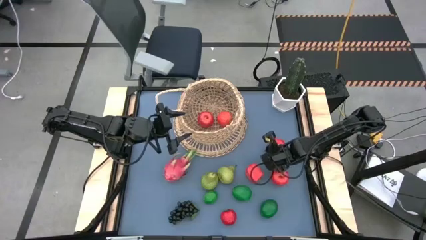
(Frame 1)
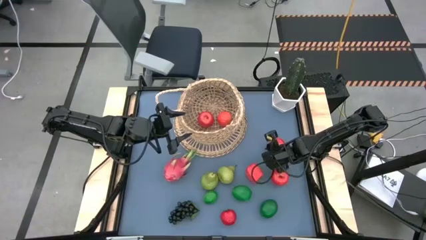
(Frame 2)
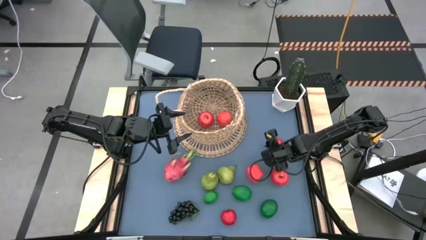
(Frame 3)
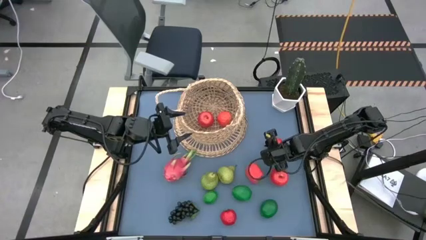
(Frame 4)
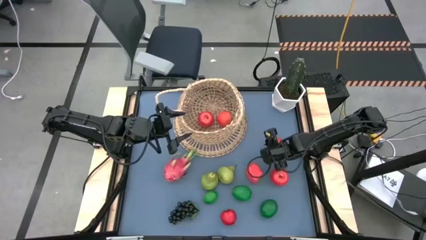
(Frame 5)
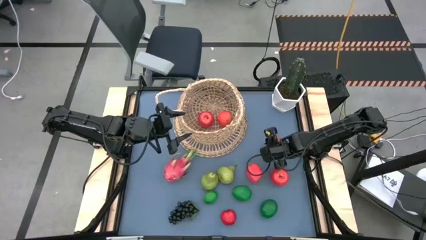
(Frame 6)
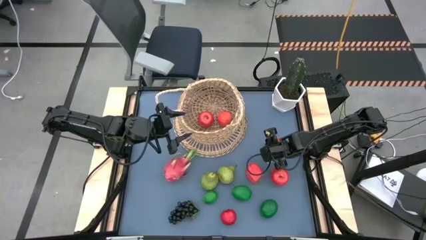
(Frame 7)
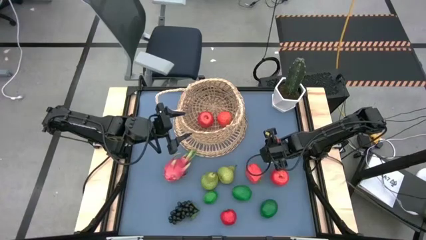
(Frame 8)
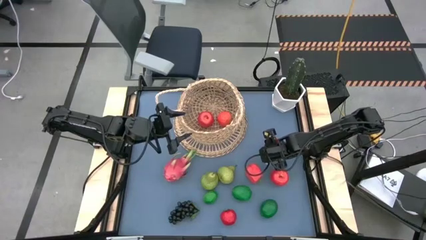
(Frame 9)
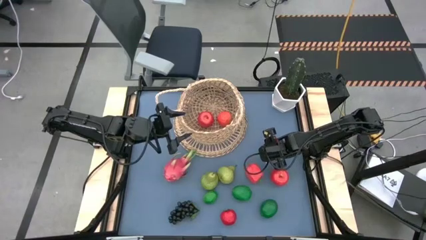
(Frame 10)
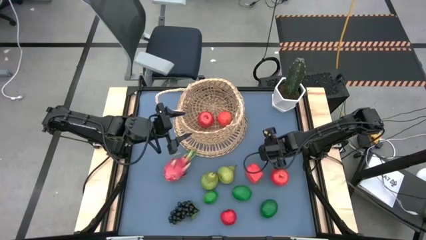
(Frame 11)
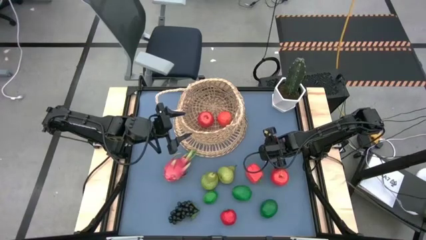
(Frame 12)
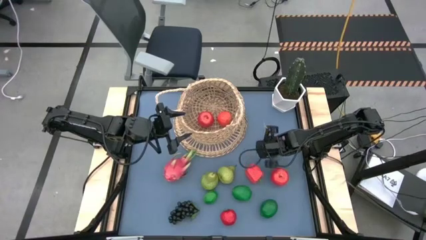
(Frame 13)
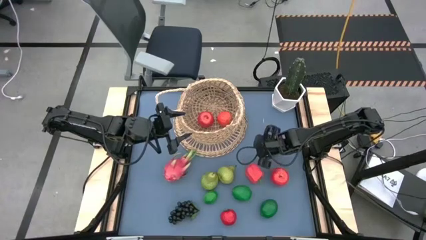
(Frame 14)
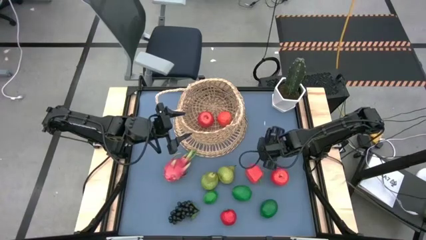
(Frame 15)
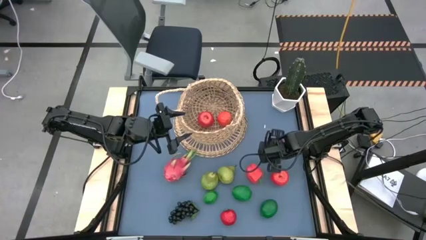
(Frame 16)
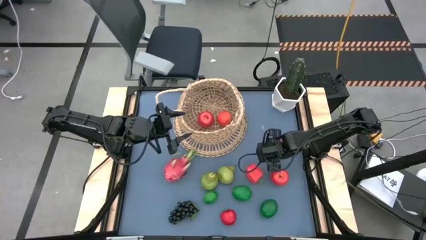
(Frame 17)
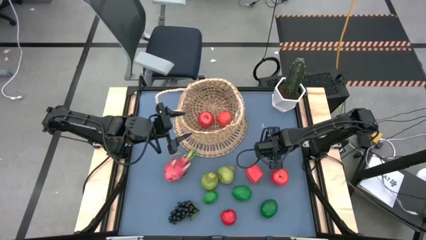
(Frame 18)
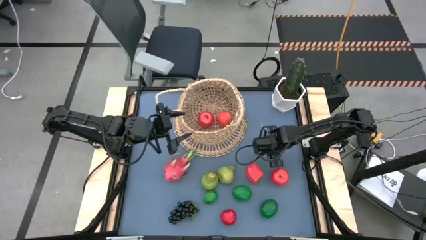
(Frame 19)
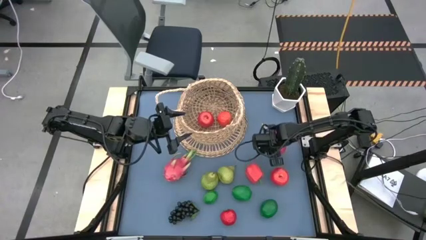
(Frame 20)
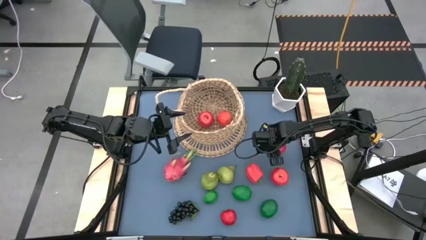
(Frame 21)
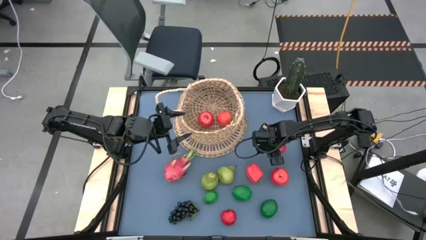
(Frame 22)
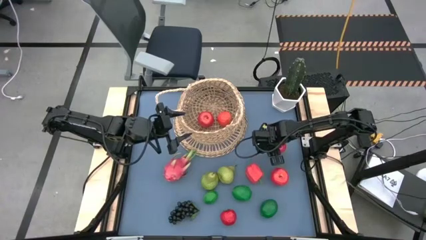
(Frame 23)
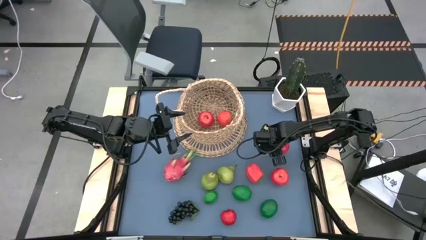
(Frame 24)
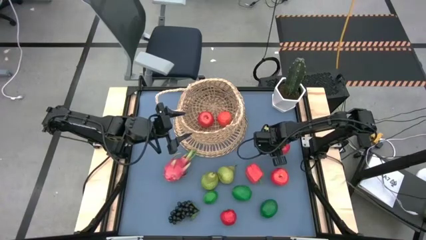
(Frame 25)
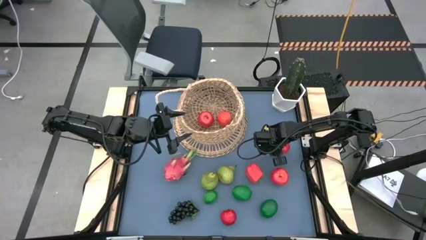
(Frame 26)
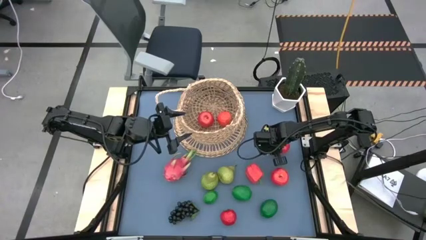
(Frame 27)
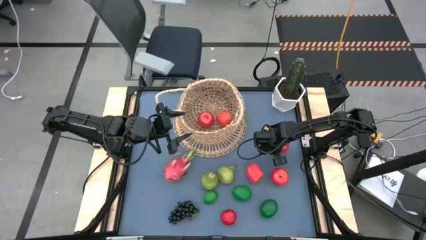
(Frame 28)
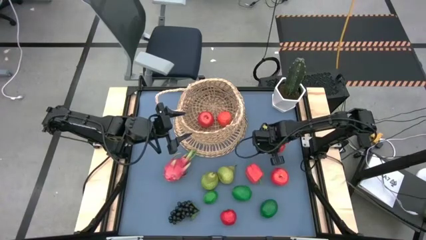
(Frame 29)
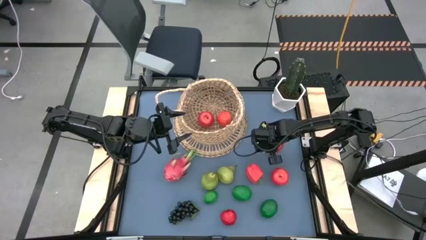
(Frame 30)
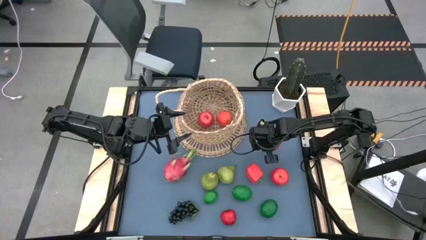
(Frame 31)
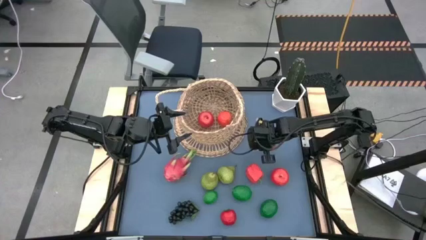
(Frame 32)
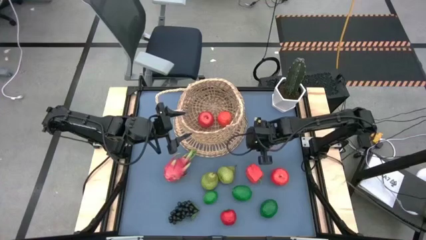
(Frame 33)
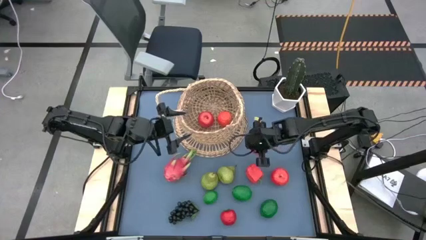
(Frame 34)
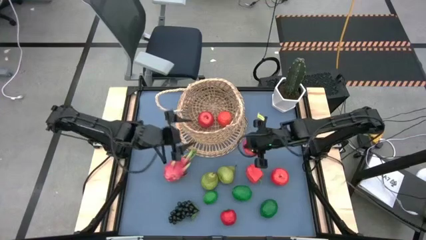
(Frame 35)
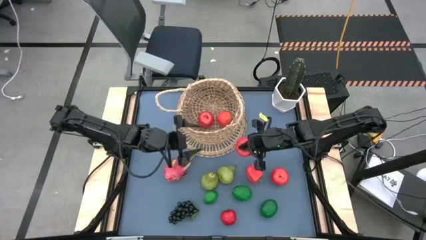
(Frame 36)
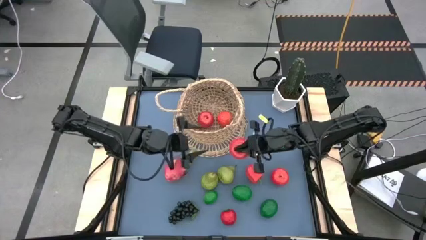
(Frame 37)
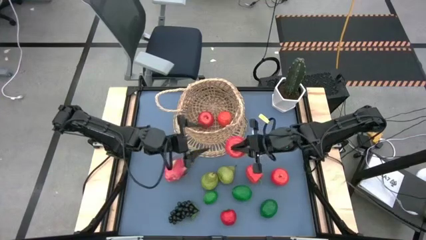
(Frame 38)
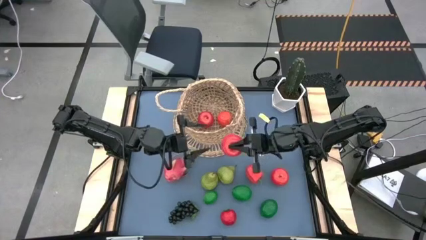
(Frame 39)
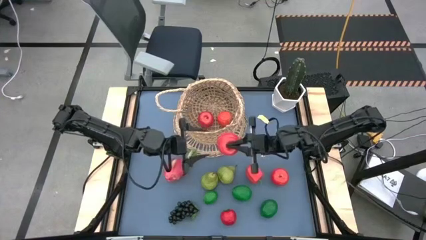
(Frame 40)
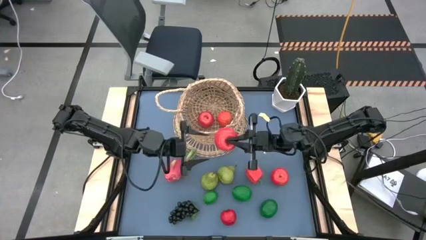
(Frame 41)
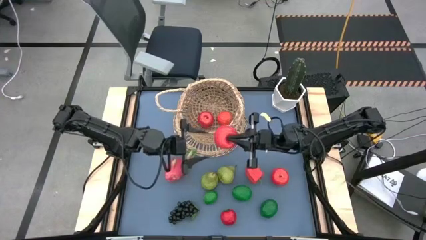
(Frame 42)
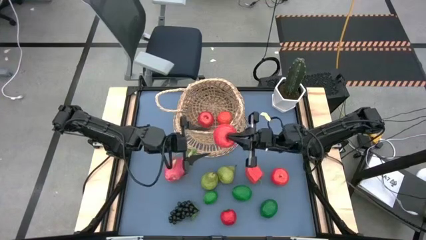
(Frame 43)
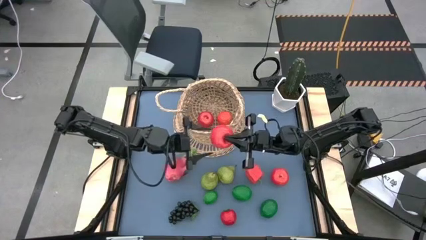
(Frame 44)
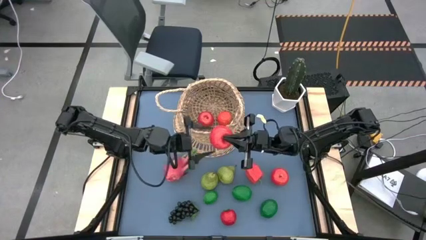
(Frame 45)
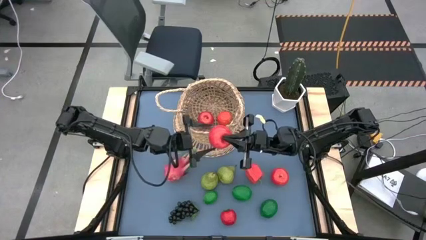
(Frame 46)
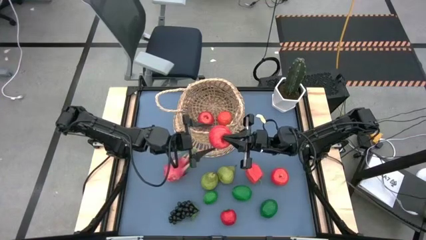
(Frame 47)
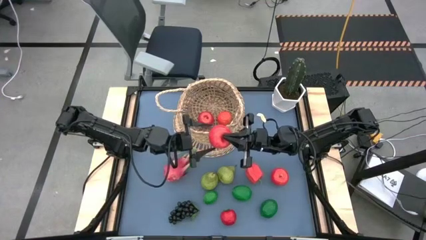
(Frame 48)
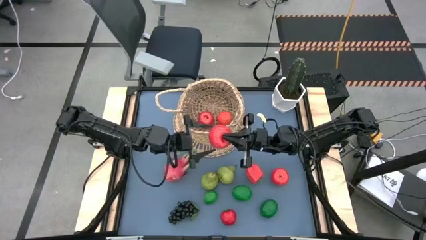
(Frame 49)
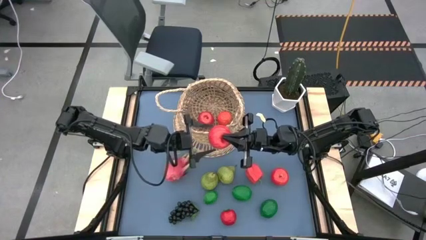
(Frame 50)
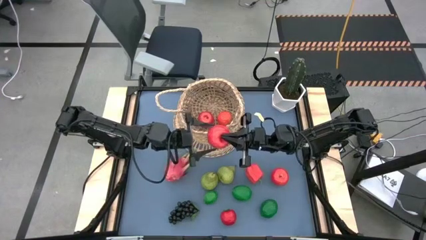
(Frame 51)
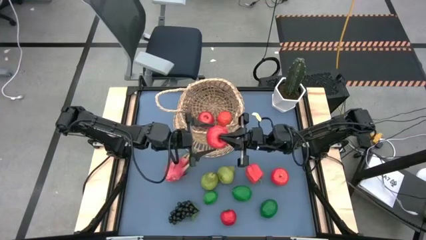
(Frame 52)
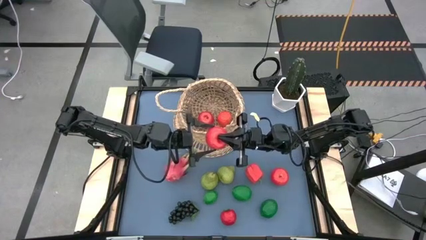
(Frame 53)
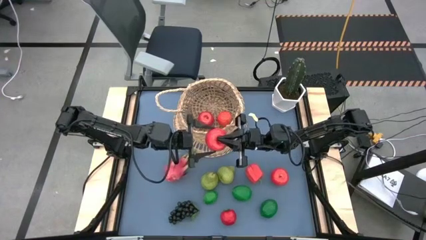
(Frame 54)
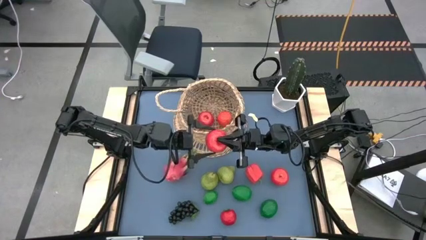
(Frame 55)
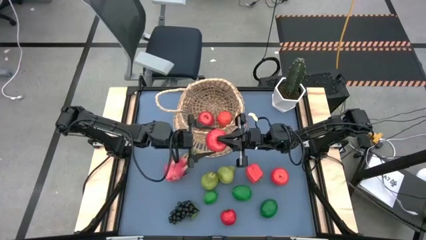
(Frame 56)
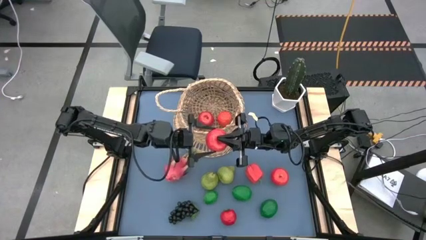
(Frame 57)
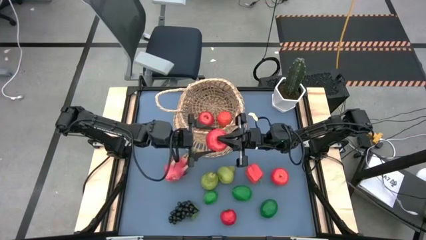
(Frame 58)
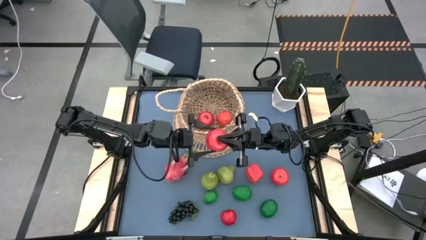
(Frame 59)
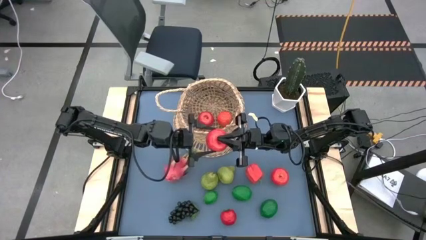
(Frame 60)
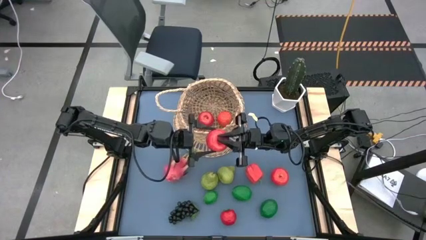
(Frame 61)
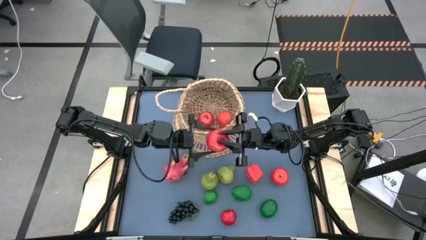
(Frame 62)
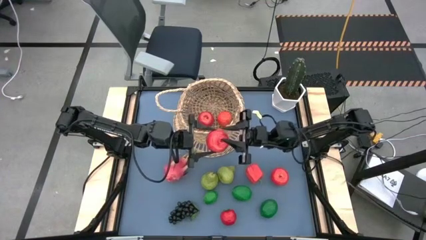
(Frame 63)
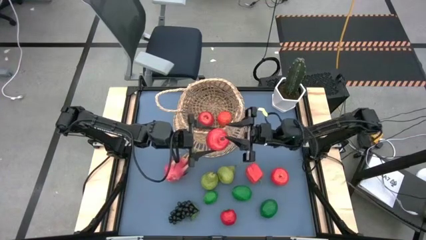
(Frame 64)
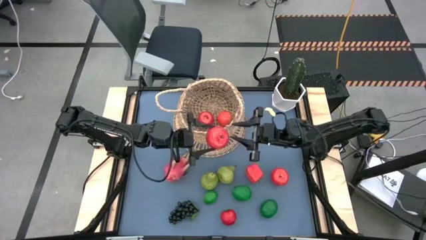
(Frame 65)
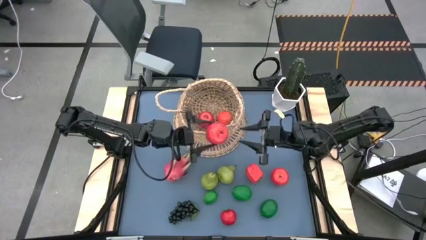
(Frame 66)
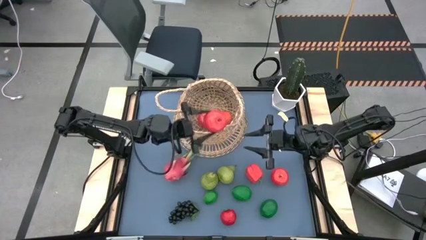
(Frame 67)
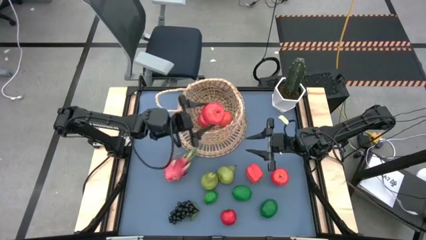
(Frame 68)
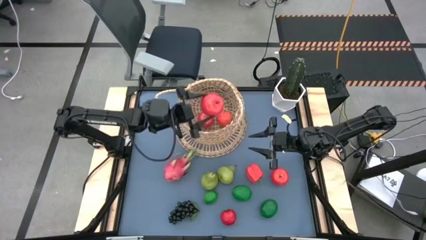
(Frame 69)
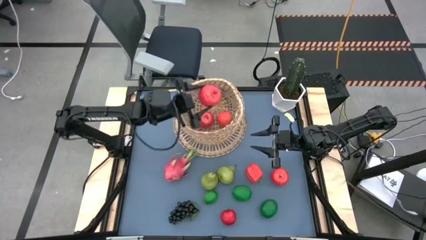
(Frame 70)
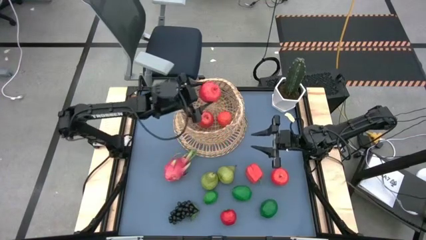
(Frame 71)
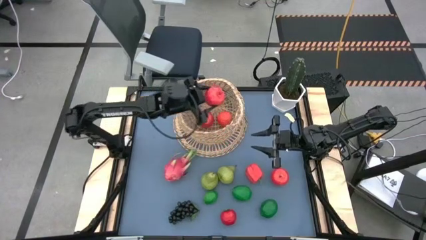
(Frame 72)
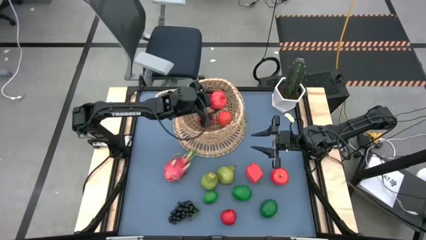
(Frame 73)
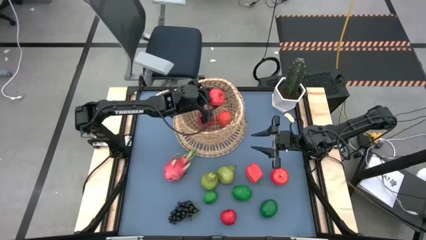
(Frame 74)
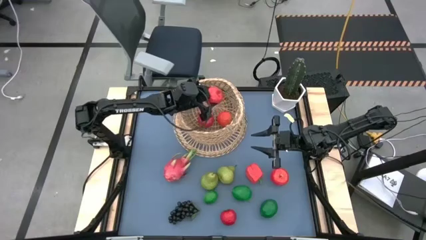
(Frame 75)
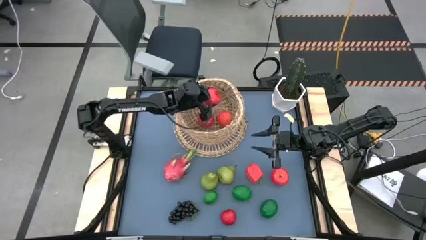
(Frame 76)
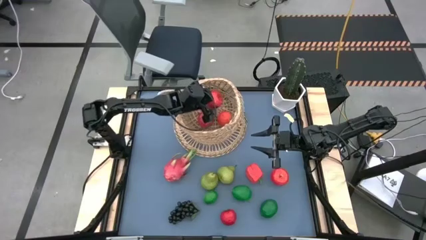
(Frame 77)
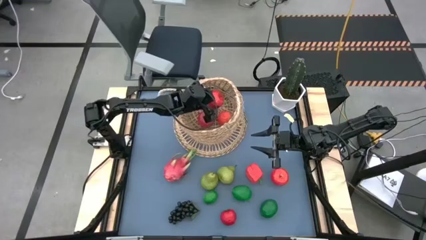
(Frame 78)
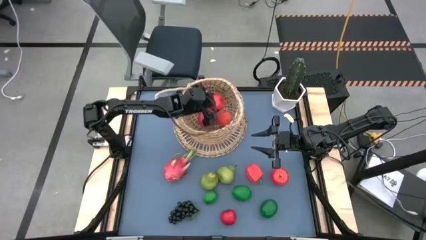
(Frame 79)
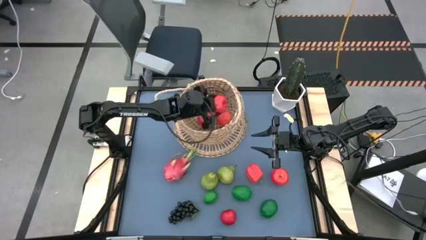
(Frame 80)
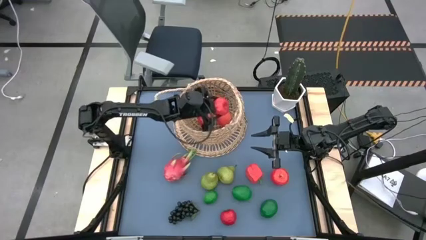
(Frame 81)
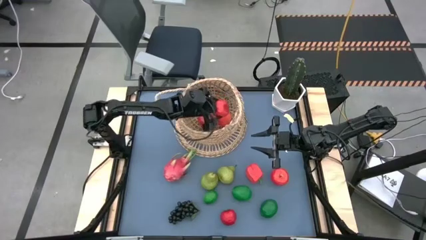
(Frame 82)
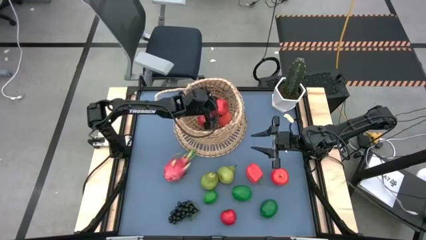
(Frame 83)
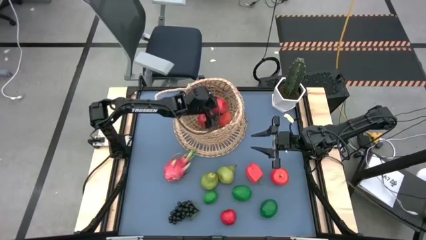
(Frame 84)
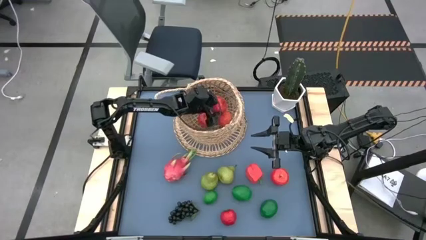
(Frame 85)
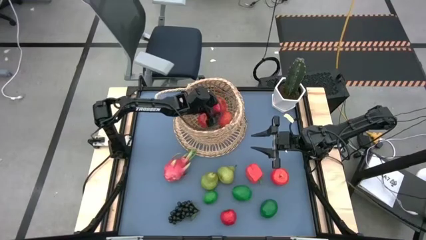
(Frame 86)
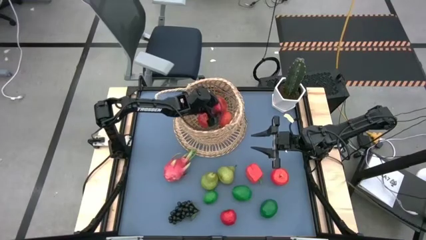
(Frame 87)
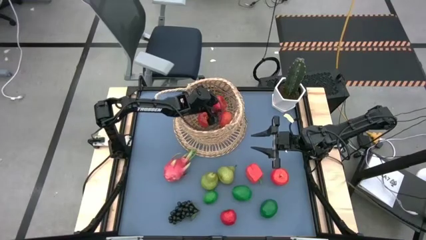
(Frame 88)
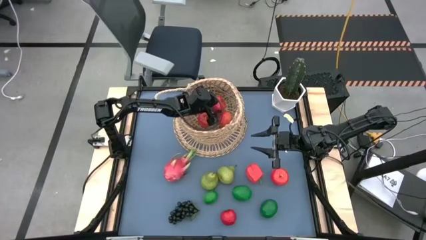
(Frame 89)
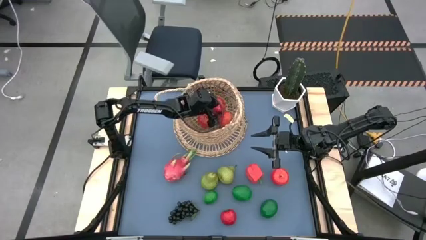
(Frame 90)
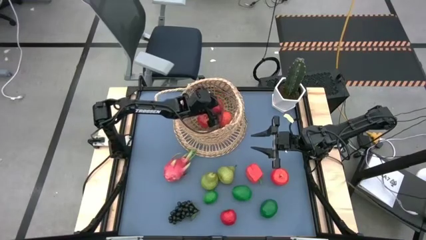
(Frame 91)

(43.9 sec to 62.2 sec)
Task: Build produce basket
Put the apple into the basket
